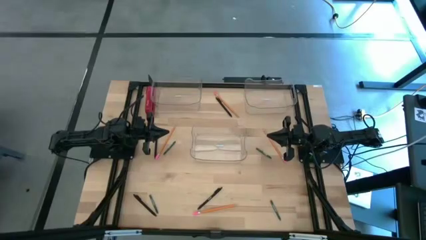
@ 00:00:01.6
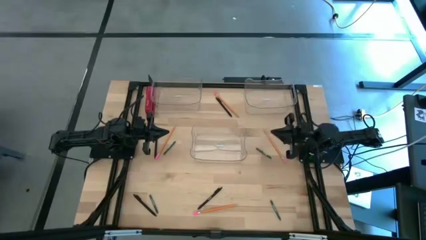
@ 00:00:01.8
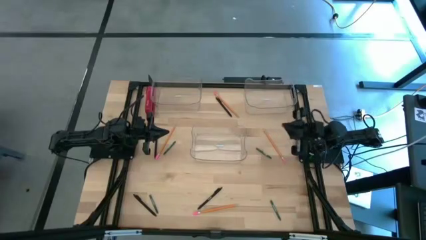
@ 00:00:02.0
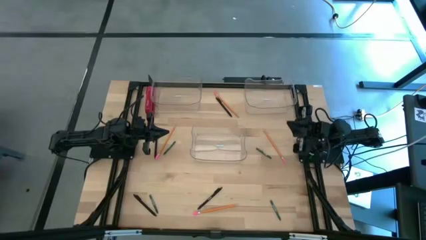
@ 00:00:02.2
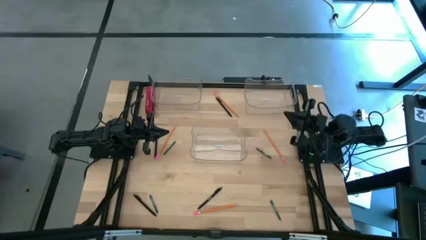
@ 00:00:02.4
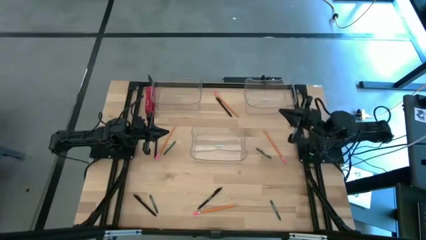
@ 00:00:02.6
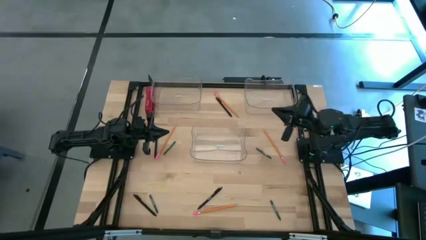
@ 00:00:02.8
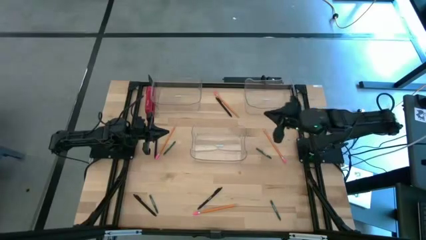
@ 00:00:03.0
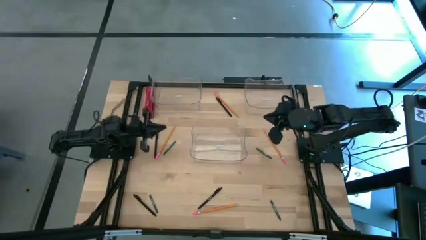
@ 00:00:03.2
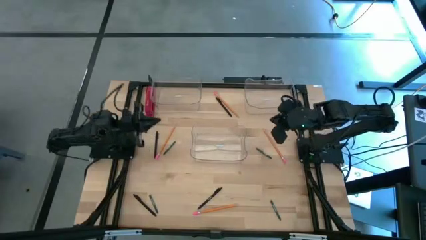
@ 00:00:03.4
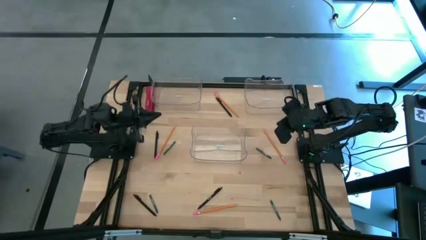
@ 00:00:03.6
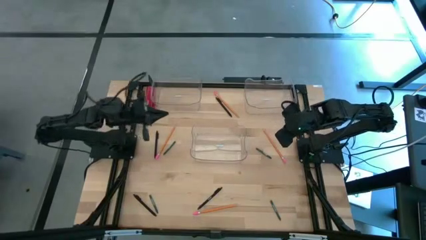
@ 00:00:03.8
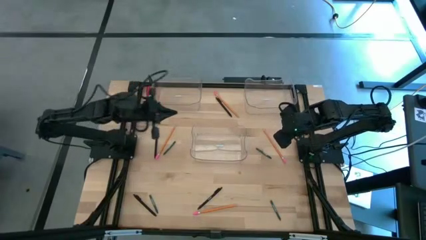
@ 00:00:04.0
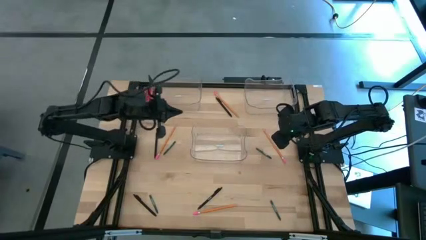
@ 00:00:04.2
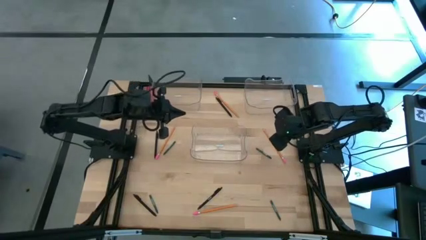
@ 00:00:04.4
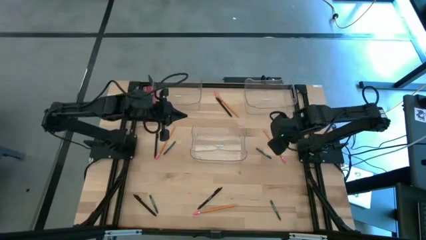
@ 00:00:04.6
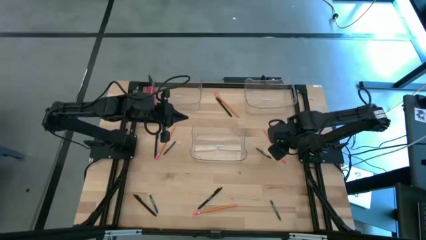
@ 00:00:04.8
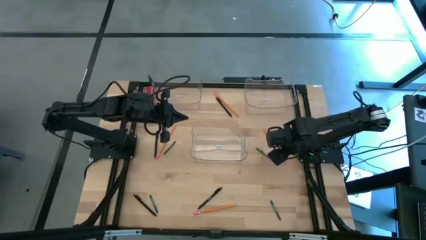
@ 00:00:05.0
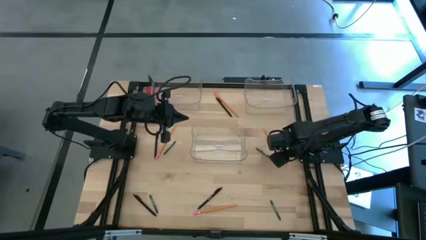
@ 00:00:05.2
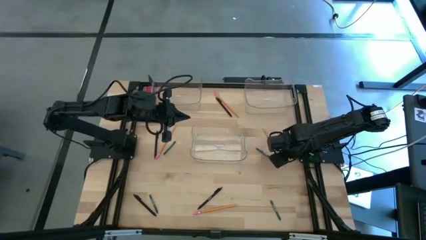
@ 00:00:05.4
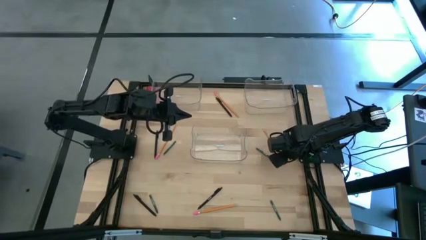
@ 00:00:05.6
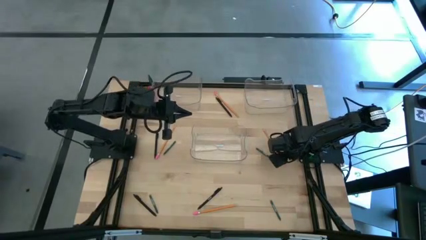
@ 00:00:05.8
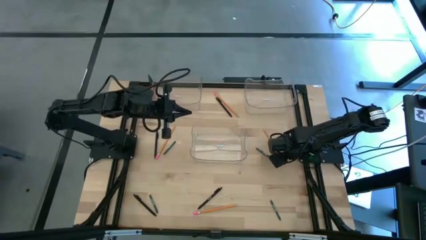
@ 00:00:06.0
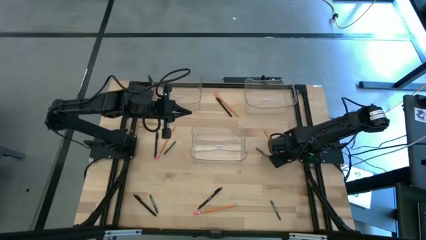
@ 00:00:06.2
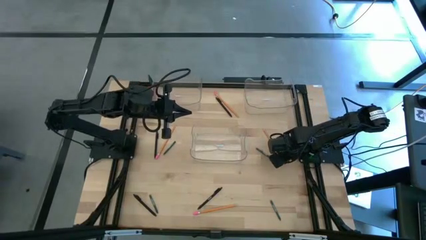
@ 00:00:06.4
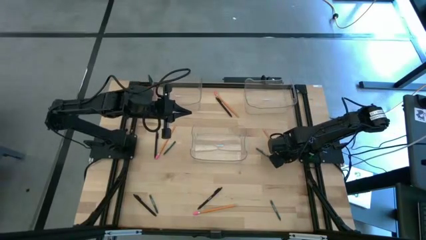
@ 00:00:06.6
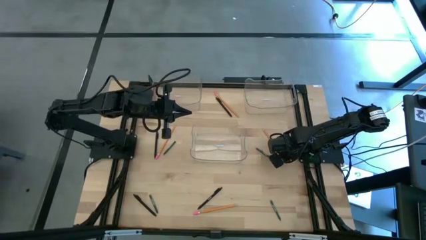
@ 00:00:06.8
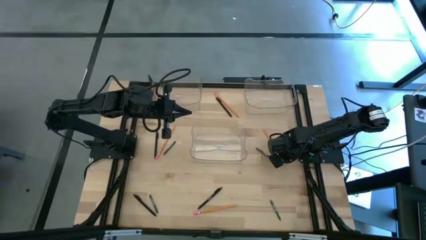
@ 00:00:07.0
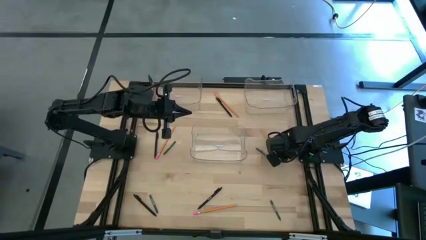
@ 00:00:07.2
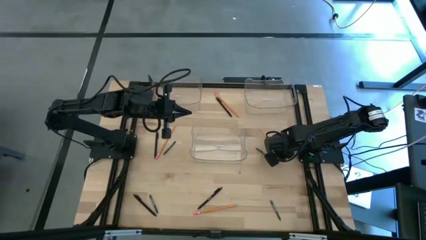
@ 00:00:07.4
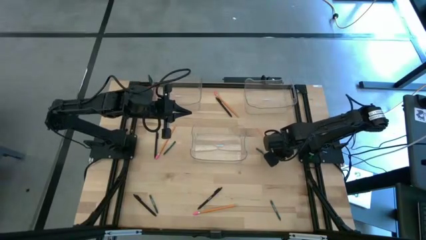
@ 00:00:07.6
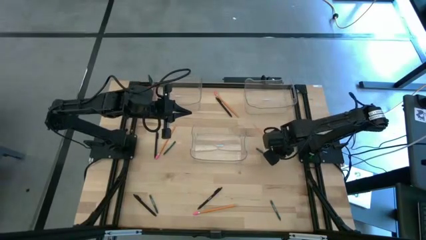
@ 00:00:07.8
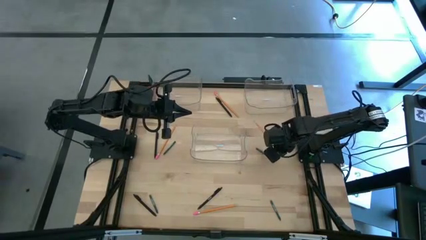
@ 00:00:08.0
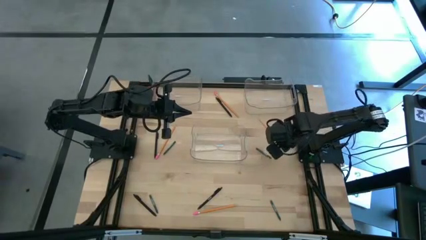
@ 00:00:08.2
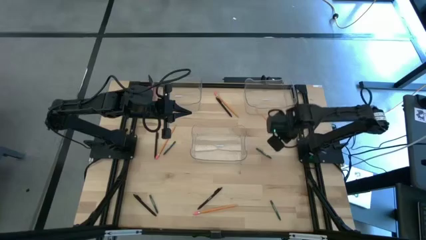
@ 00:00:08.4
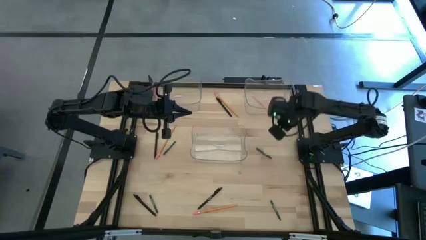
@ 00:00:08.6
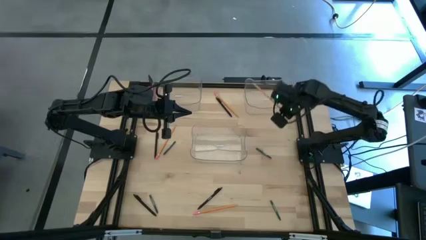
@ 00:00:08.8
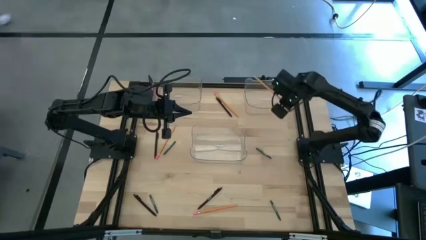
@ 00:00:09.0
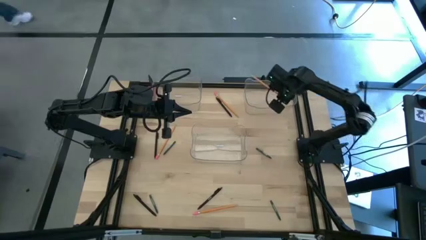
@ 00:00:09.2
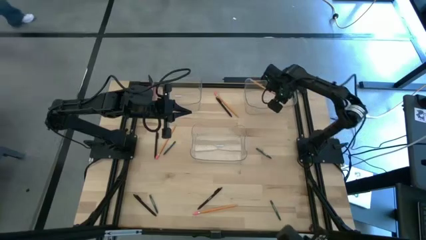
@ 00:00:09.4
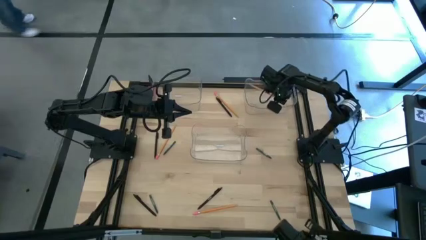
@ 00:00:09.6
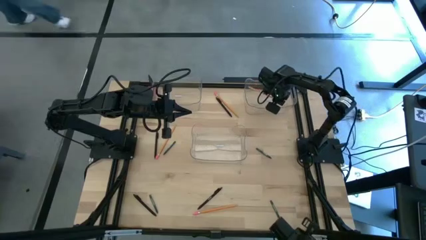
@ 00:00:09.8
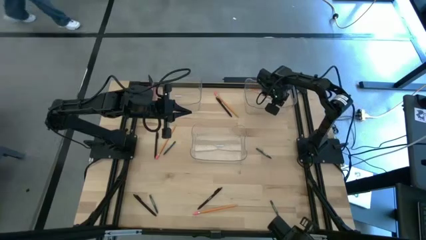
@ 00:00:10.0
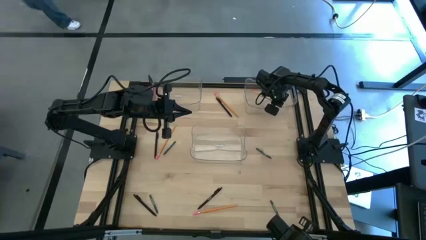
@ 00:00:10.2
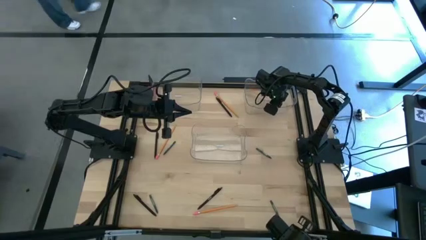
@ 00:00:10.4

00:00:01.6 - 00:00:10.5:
Task: Sort crayons/erasers/pens/pencils in bins
Put the orange pencil into the top right transparent bin

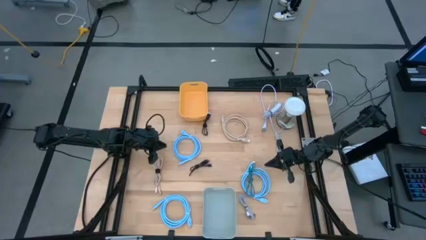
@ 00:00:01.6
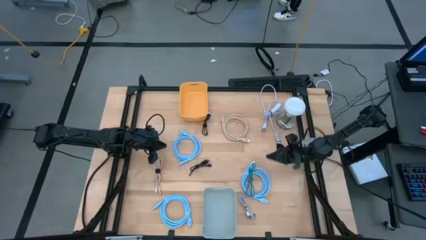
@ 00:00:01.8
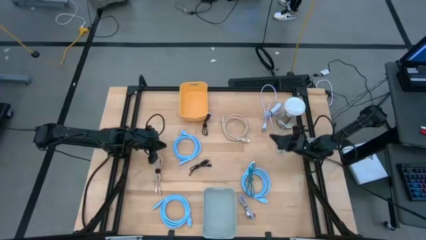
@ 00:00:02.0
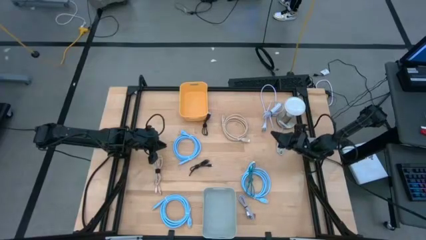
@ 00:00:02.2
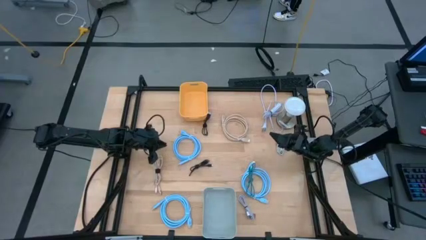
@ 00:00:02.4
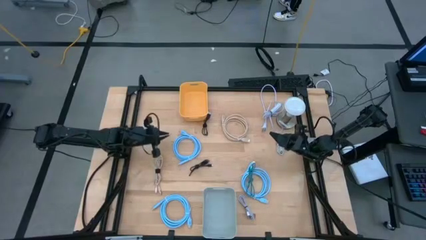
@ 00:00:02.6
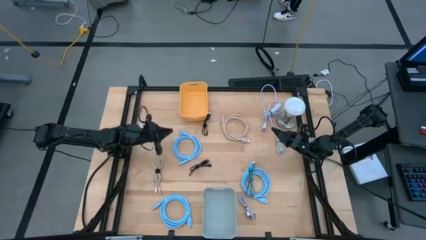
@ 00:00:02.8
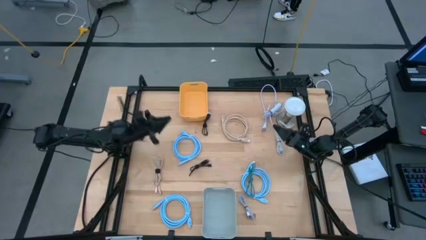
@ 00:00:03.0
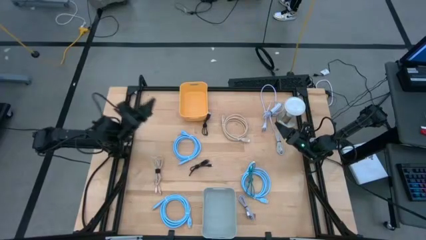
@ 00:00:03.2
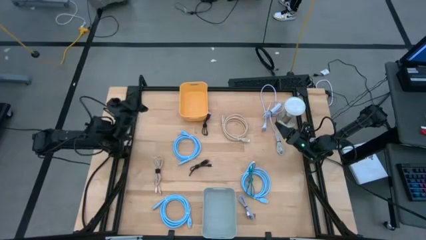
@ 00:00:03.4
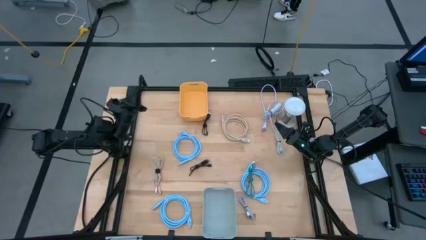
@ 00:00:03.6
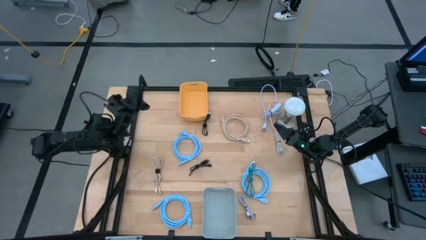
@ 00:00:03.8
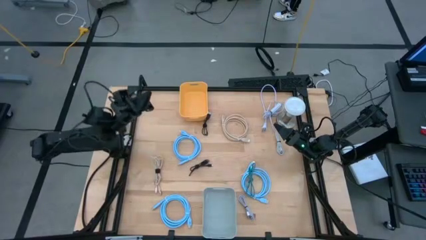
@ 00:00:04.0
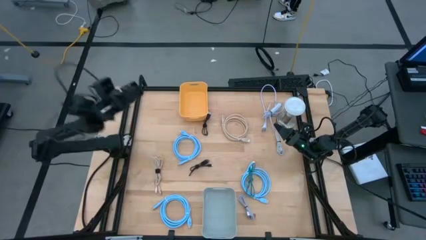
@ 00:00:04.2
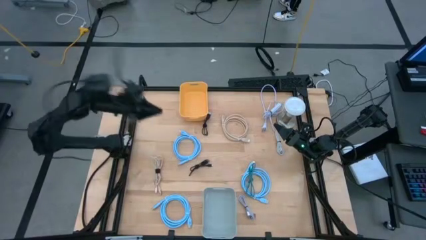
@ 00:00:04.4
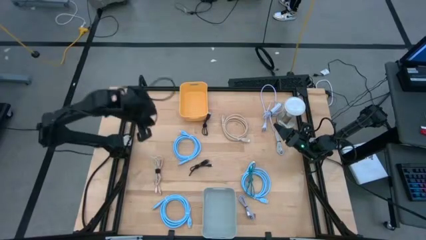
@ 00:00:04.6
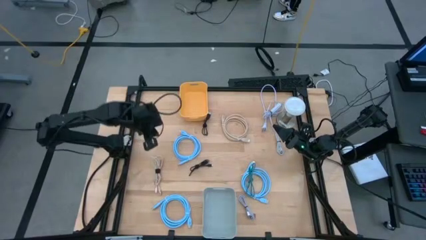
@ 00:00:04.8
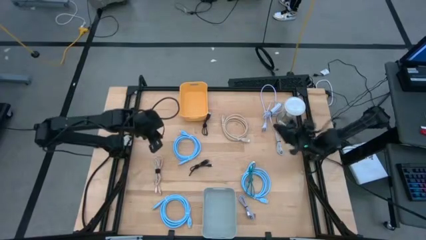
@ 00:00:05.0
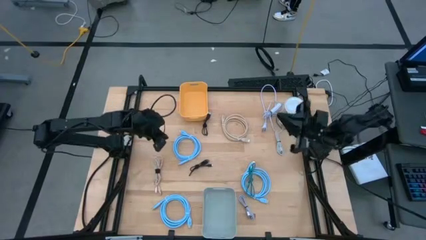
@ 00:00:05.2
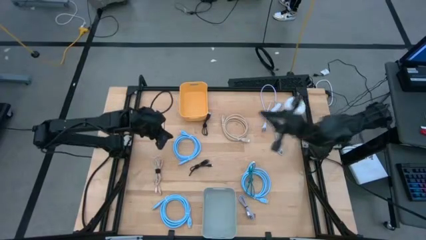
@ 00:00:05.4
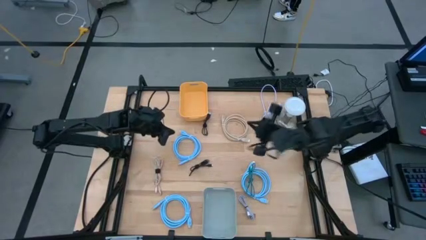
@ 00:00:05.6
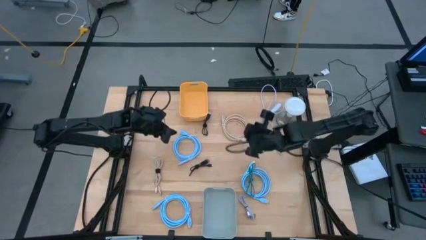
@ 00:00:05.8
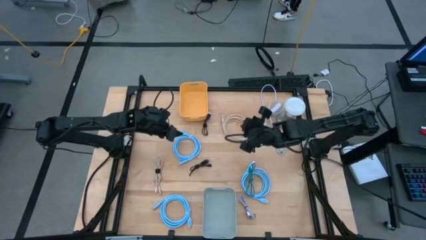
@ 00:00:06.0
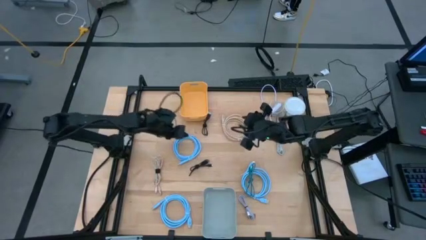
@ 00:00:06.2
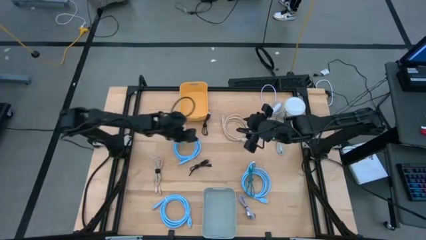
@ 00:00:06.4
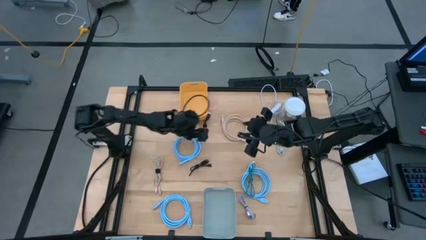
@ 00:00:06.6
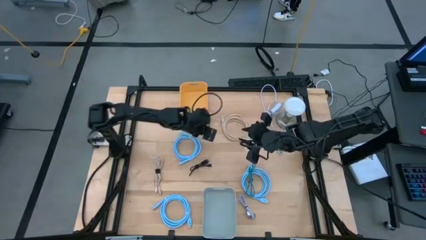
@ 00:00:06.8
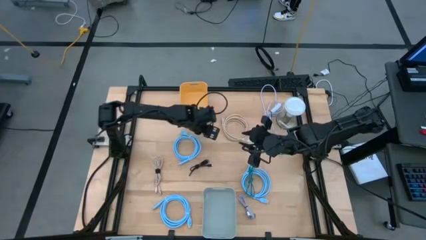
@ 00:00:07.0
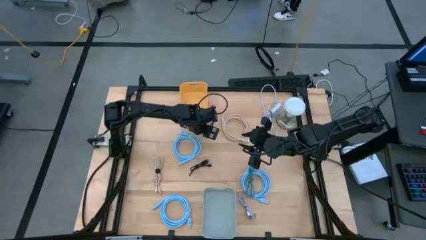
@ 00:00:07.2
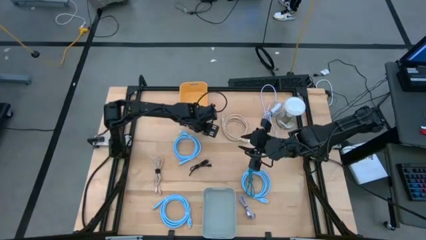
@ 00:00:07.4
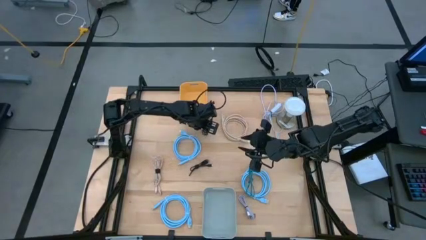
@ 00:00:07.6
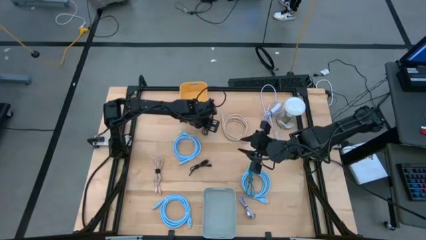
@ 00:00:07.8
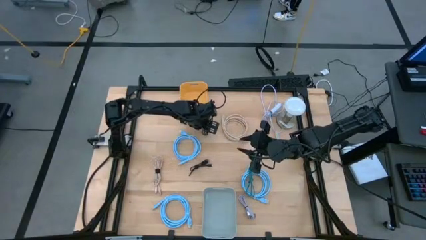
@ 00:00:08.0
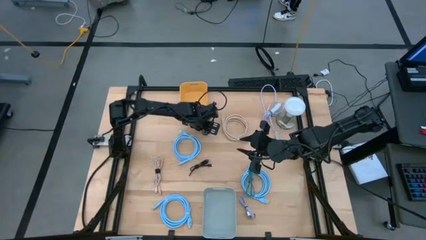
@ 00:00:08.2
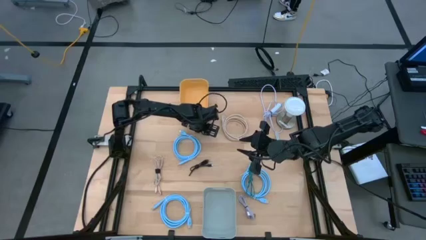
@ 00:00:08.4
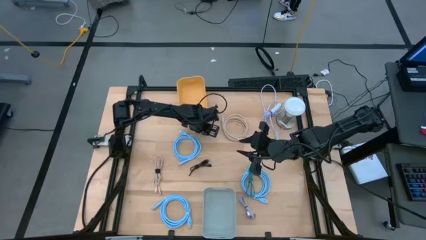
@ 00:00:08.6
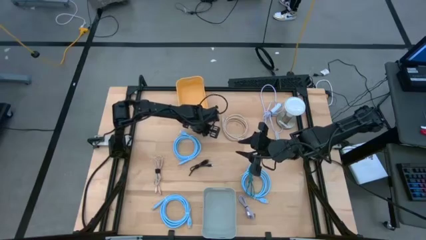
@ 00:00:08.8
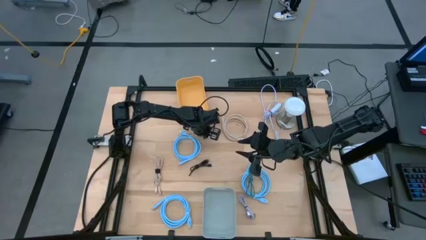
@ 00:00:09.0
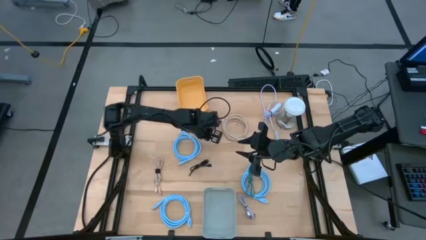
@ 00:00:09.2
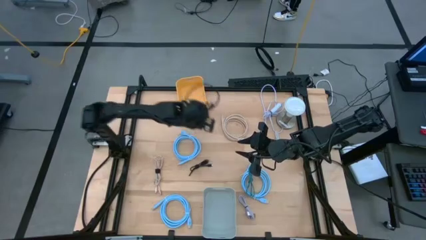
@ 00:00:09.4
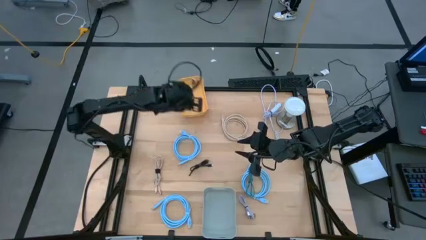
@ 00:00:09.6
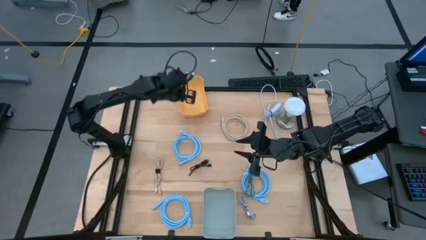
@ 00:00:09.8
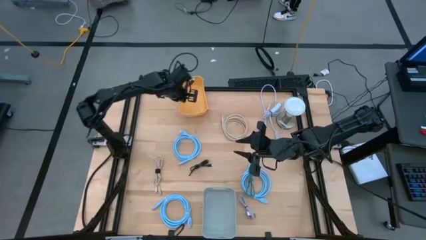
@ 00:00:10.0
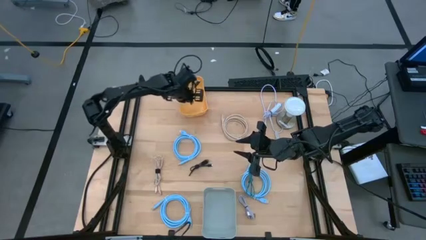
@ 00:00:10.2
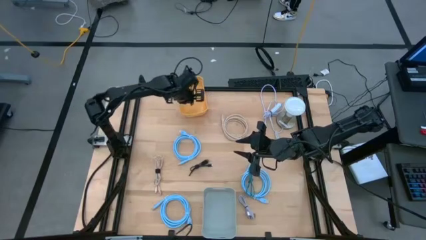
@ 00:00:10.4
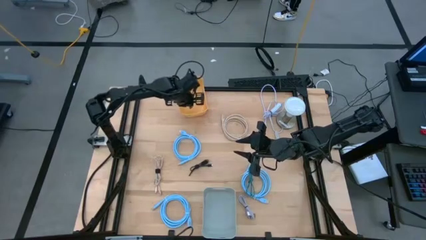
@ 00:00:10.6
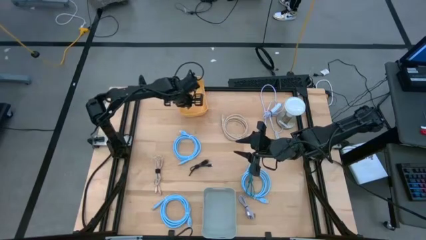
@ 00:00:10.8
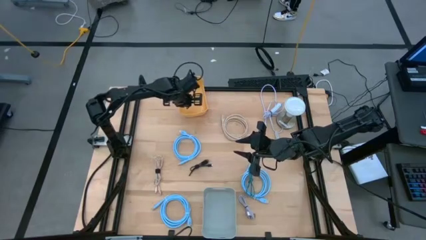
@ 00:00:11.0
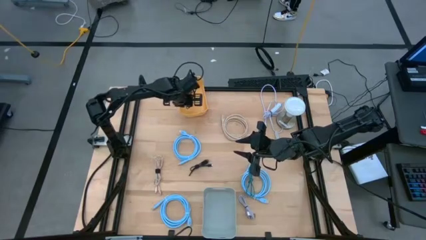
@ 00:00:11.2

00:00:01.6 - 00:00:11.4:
Task: Pick & Place USB Port
Put the top black charger cable into the yellow bin
